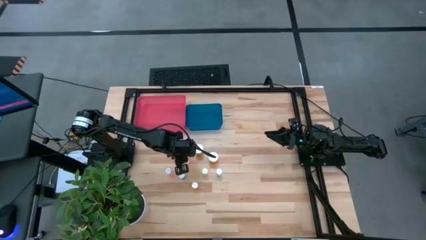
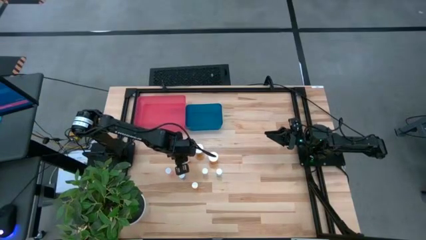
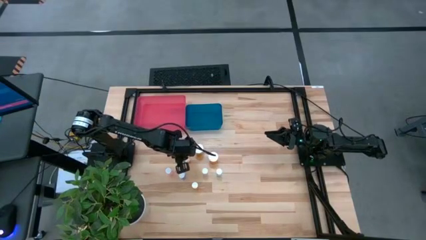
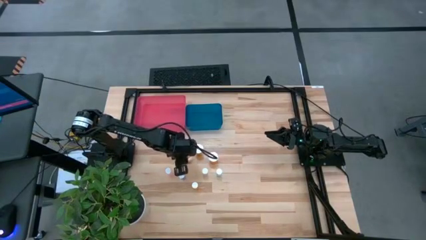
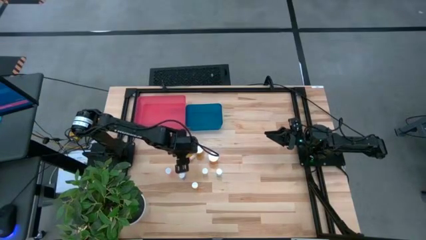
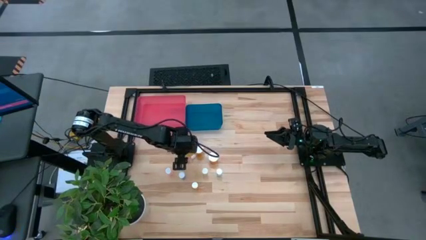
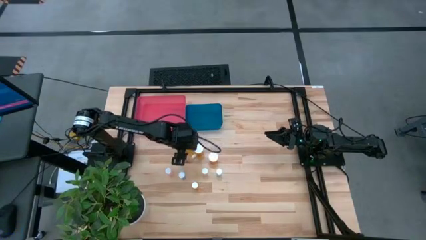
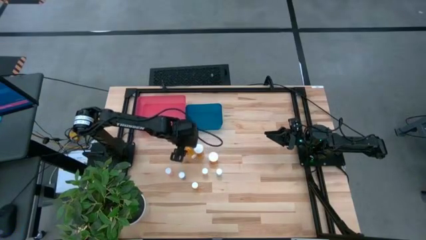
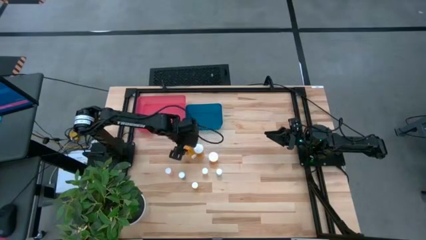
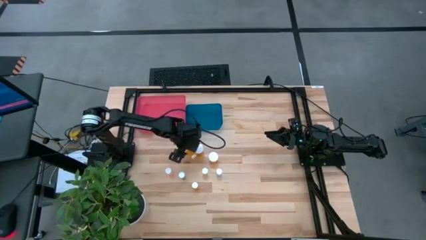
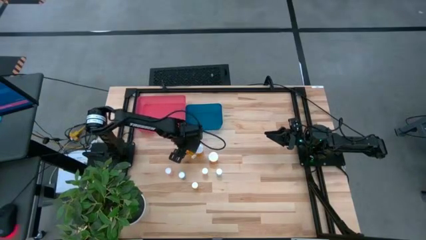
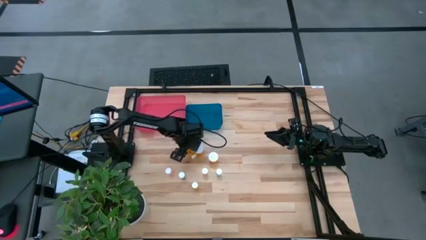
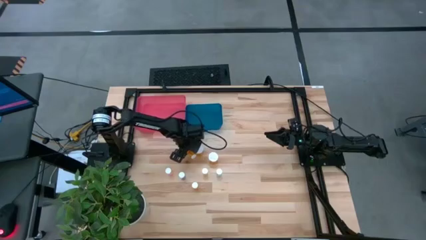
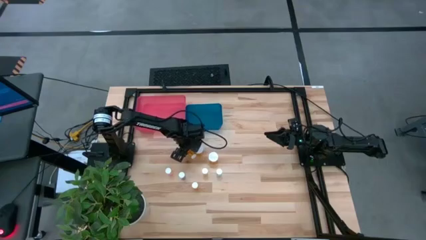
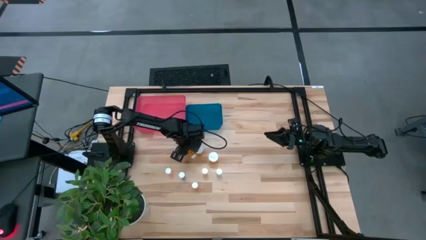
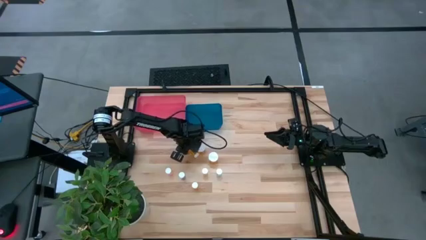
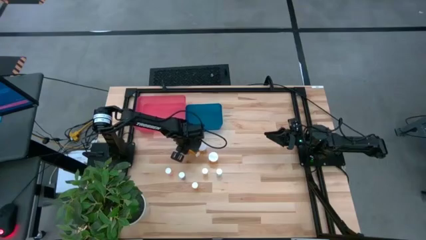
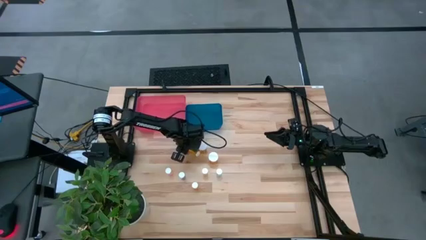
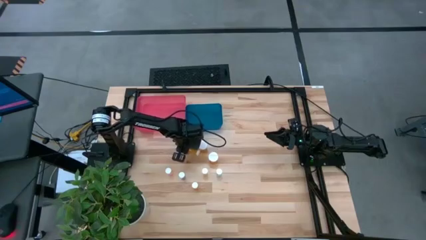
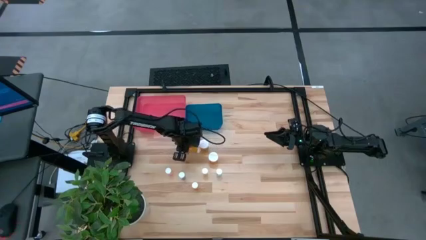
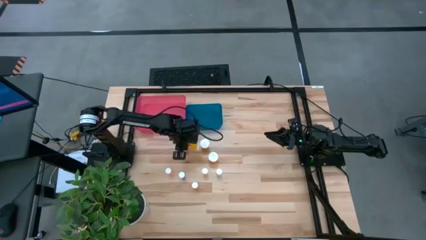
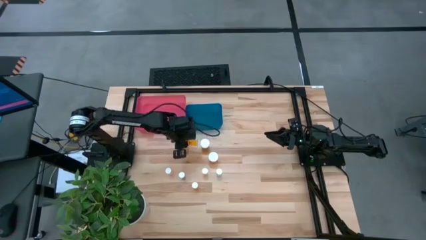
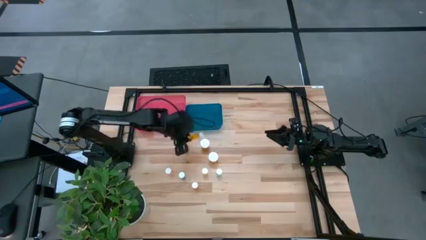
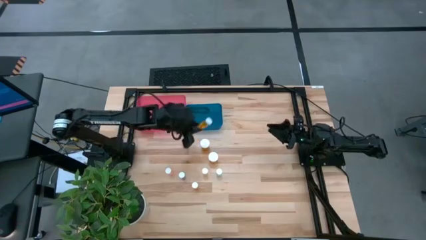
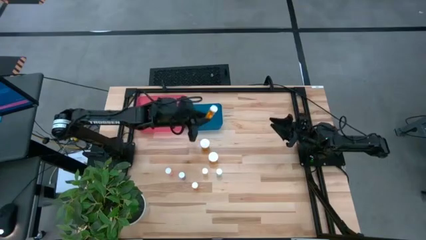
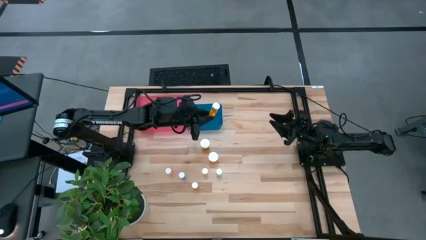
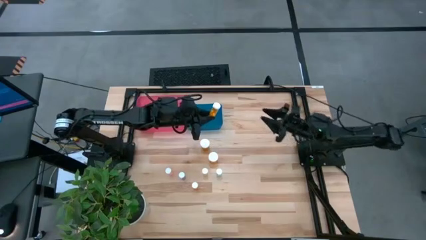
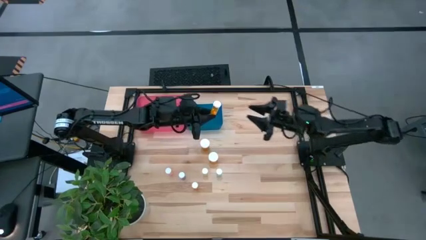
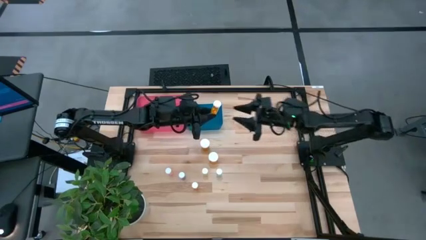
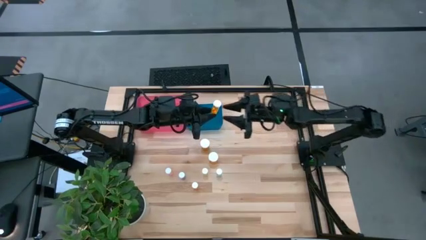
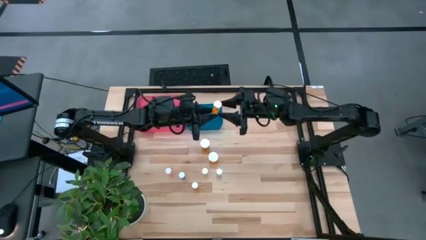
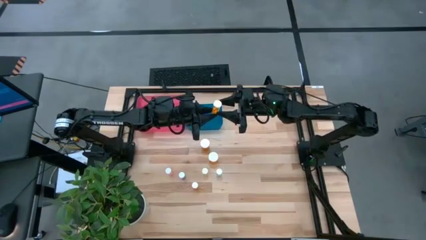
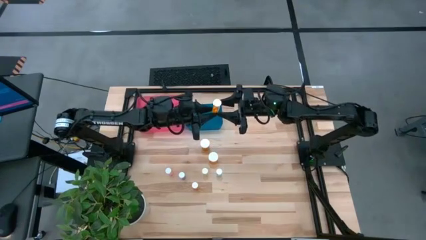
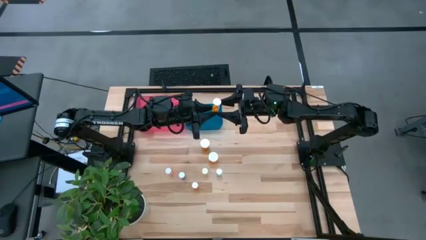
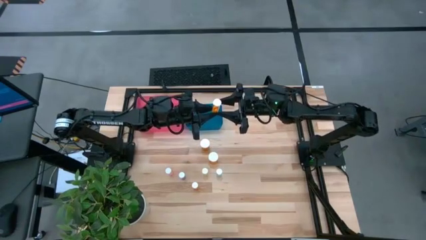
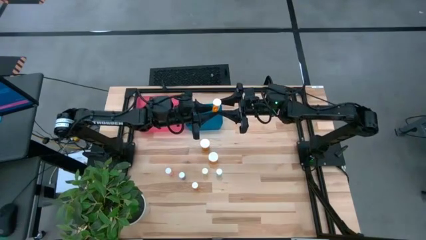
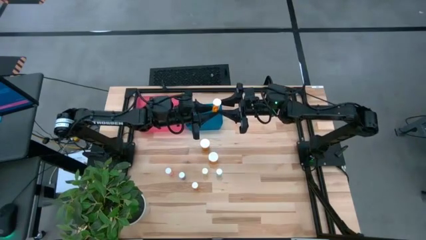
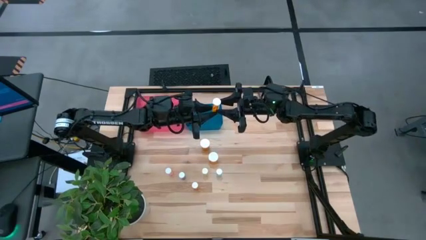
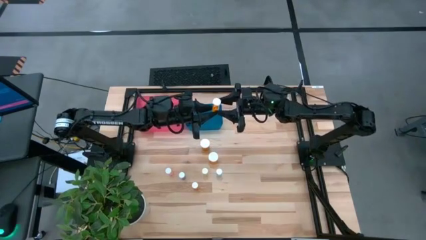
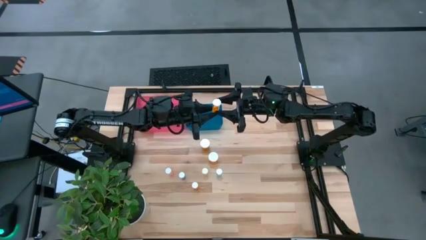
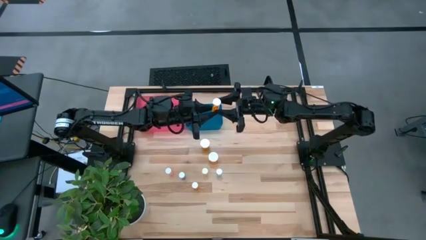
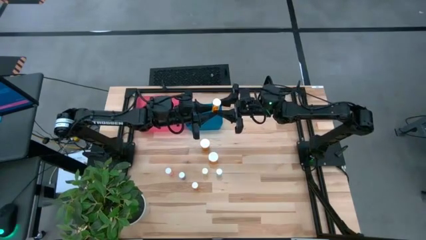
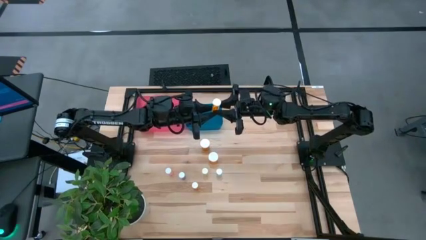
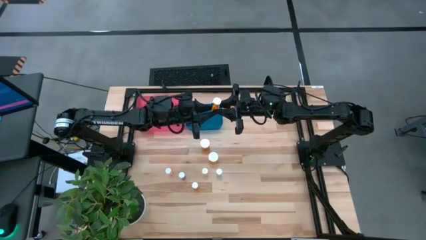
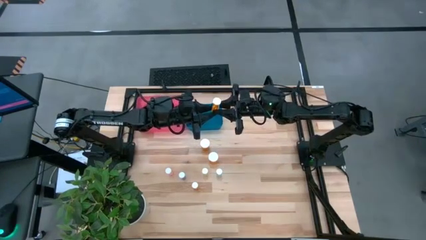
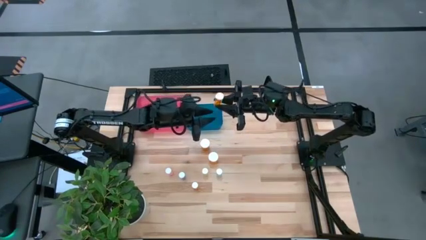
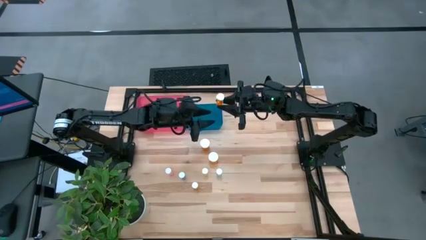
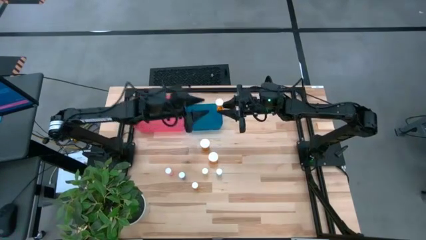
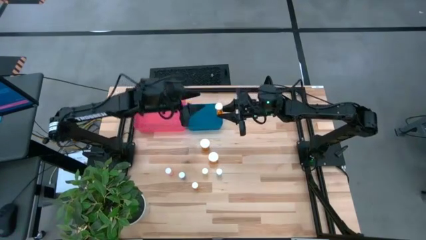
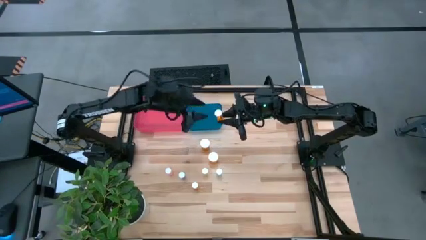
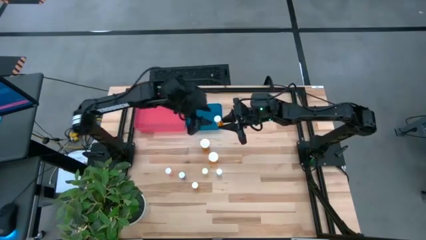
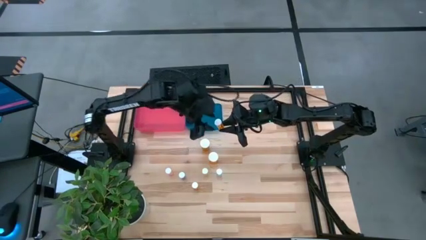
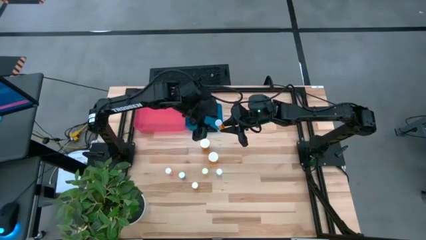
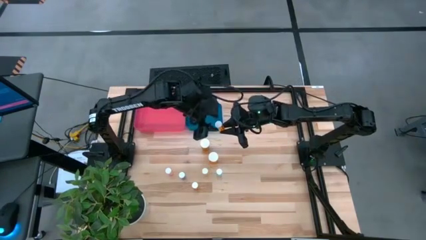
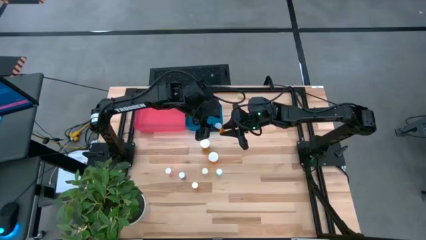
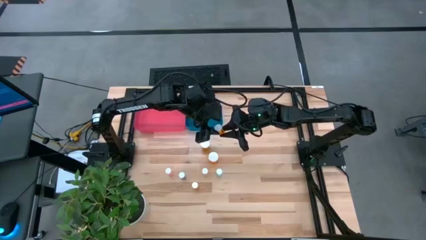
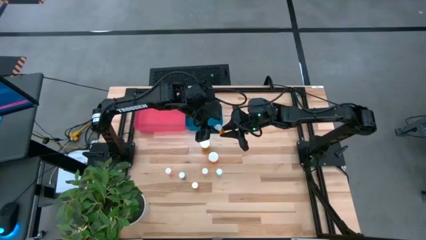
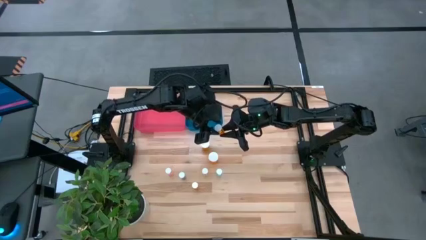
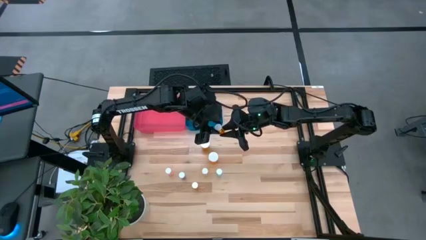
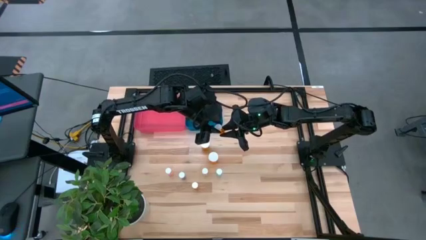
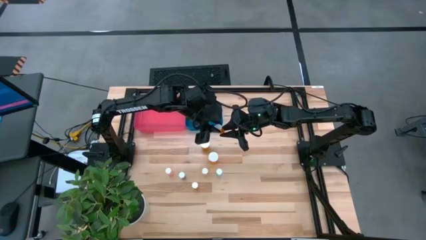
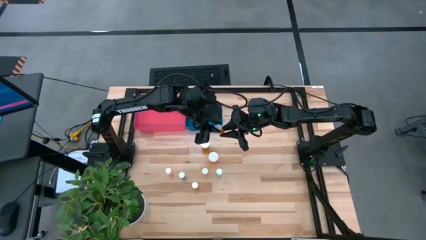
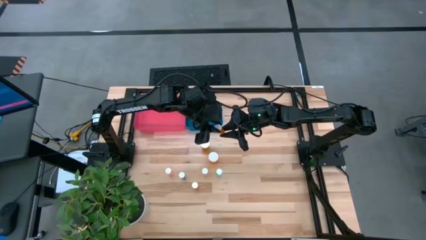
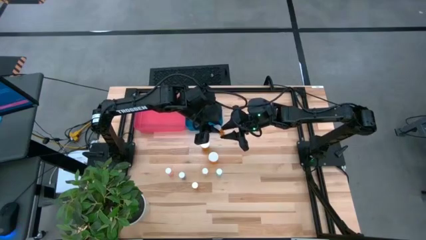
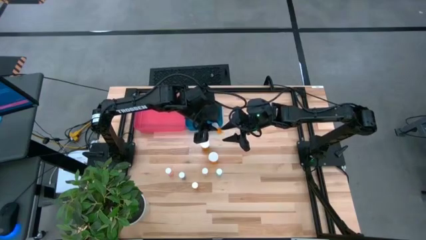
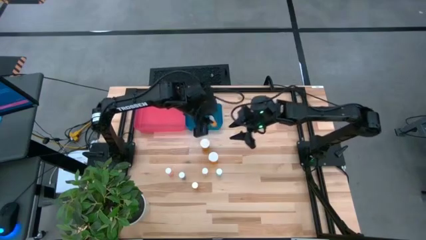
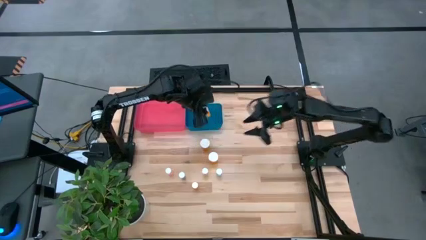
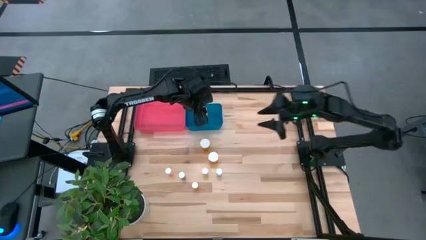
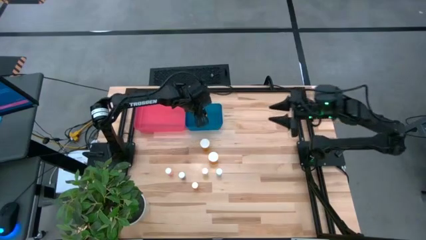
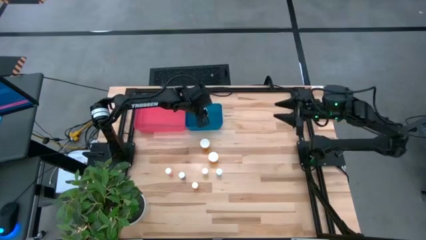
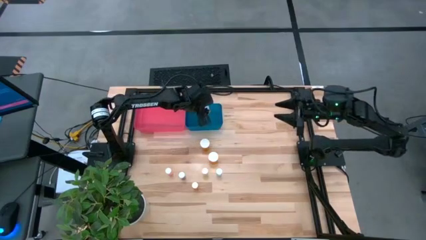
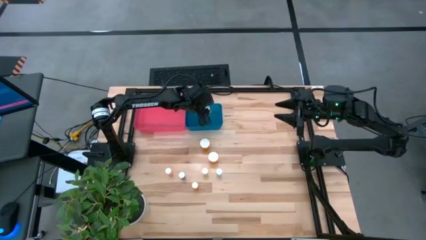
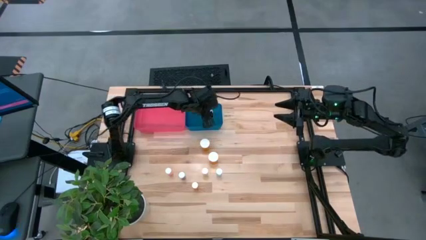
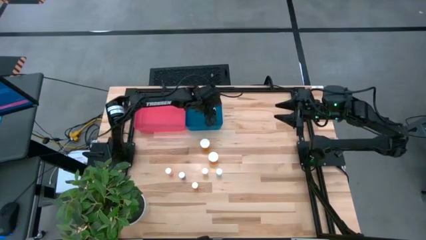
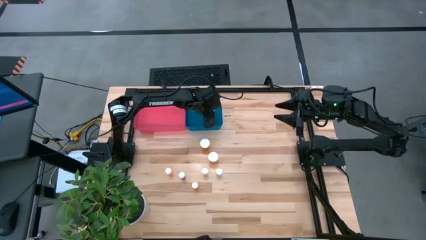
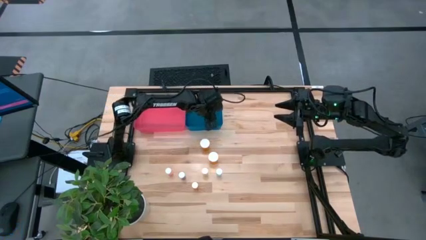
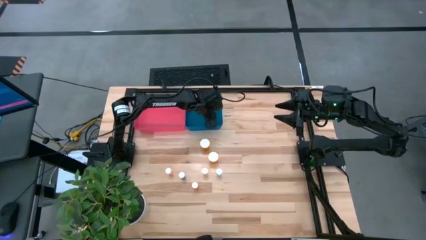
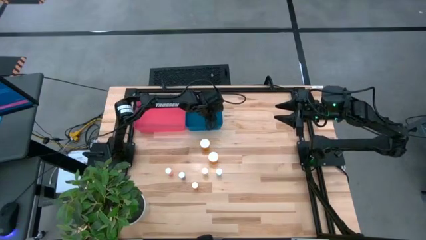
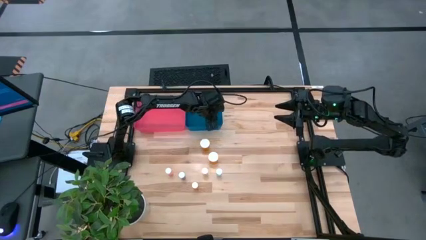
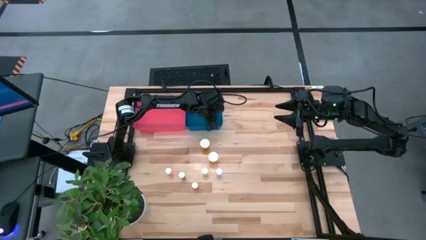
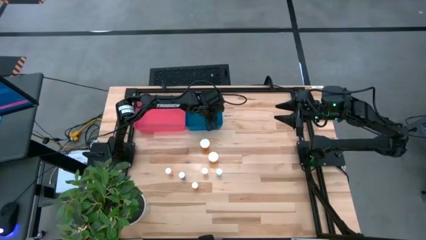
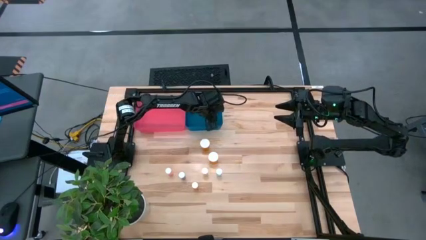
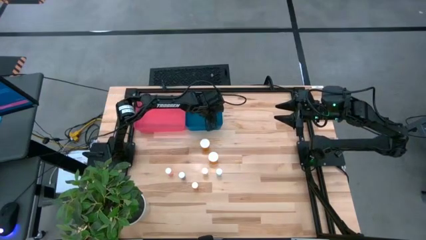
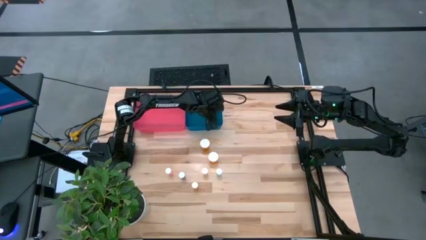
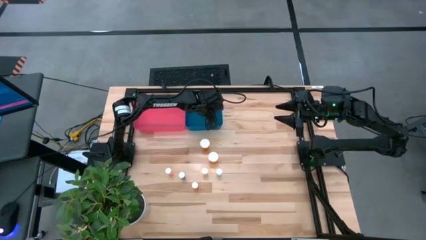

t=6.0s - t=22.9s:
Task: Pick and place medicine bottles into bin by pill shape (circle, oval)
Put the orange capsule bottle into the blue bin
